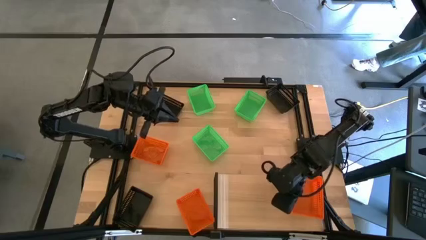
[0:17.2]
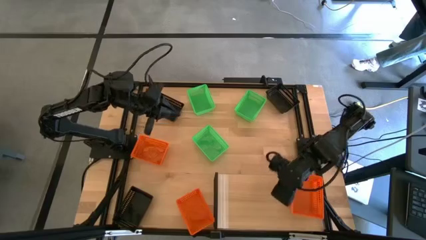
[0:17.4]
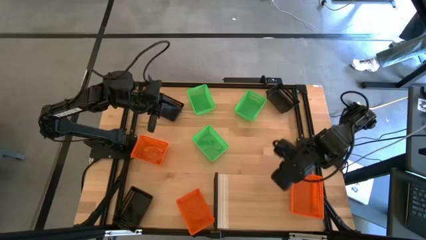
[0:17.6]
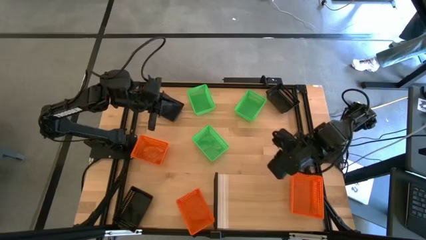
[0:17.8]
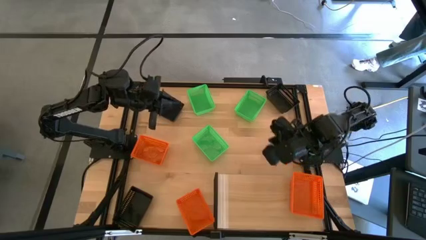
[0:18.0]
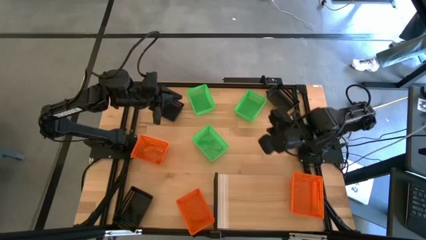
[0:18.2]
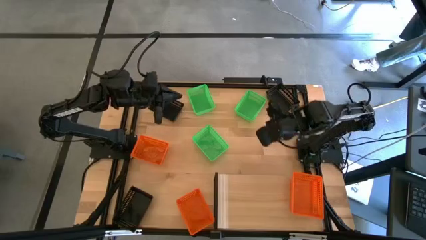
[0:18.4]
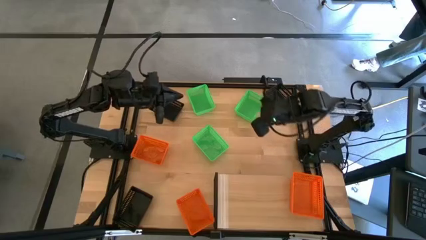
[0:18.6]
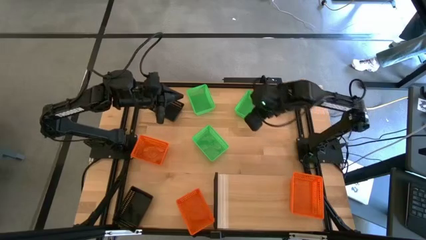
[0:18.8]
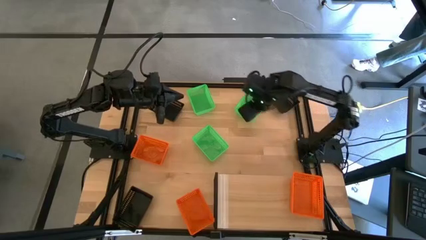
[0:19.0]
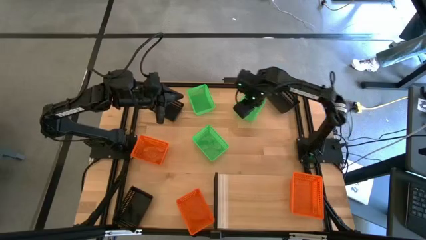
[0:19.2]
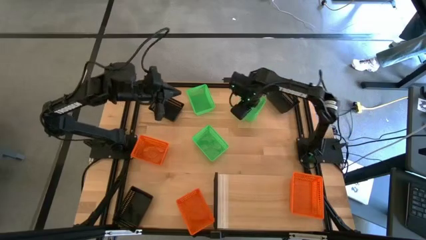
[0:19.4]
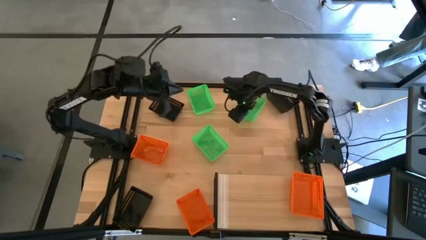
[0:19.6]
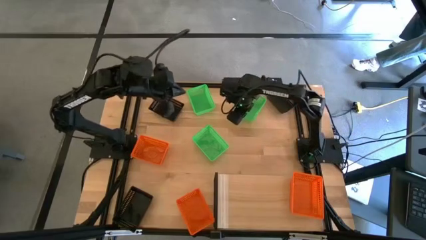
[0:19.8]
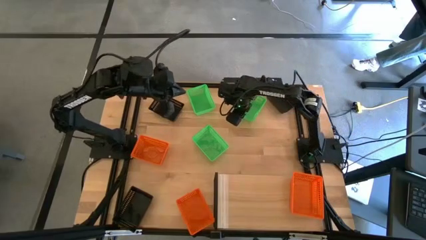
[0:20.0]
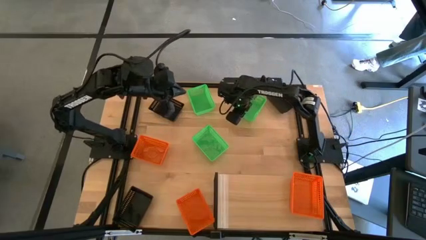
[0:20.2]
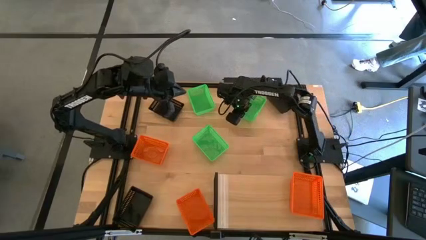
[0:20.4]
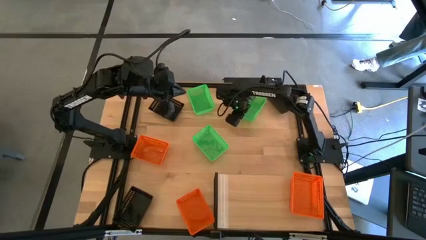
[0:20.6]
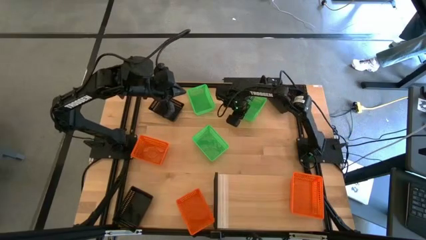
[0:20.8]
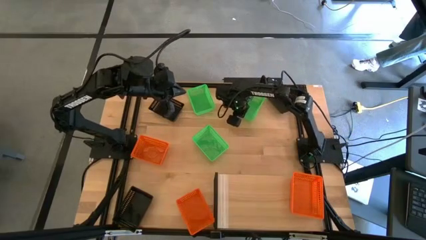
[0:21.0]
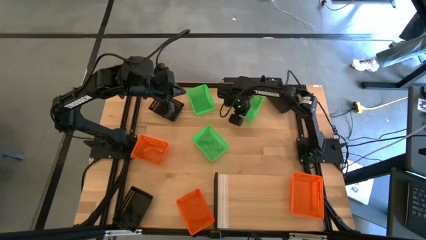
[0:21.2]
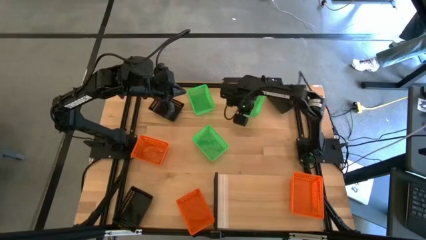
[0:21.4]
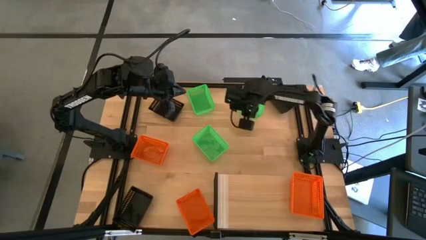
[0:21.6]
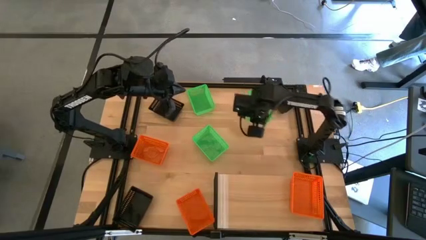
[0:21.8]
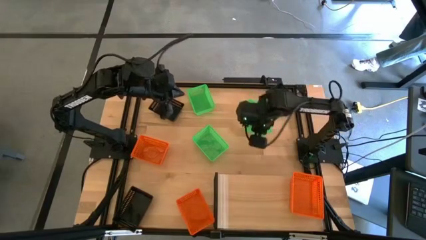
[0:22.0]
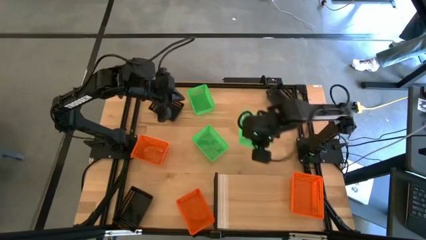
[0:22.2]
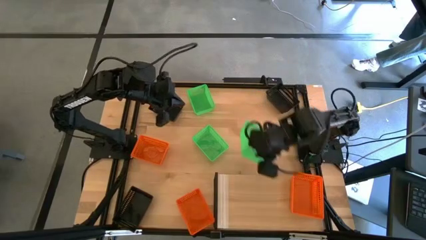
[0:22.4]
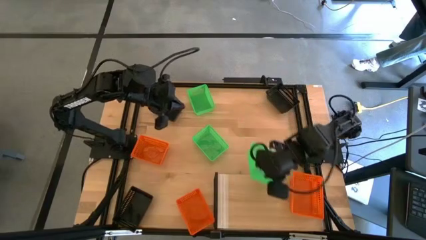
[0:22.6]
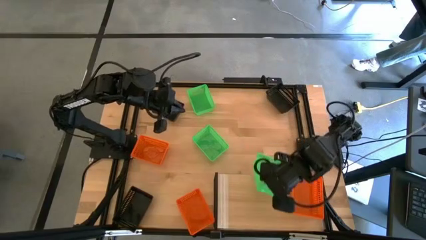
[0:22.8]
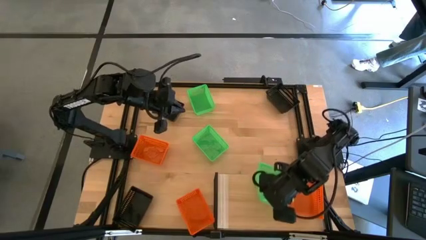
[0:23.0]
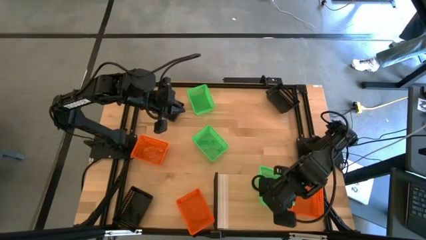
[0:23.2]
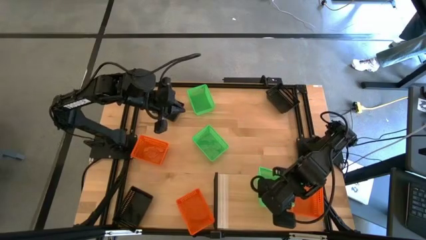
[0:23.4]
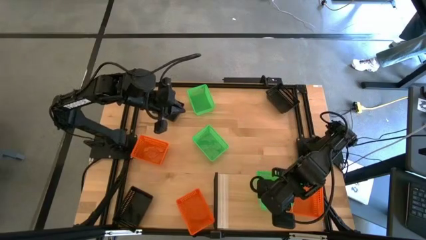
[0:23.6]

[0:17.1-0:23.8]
Task: Stack baskets on shelf by color
Put the top right green bin on the shelf

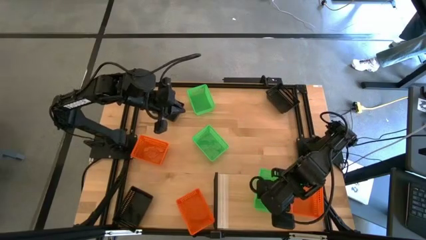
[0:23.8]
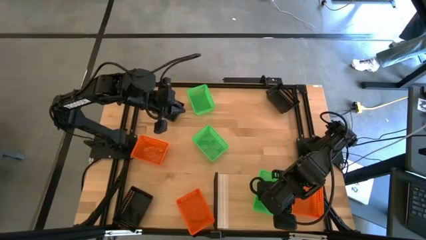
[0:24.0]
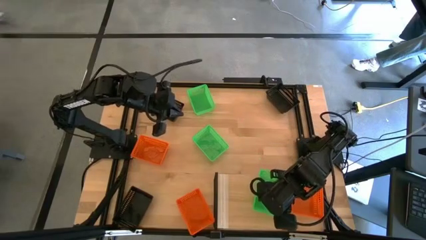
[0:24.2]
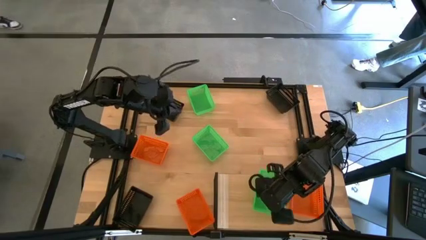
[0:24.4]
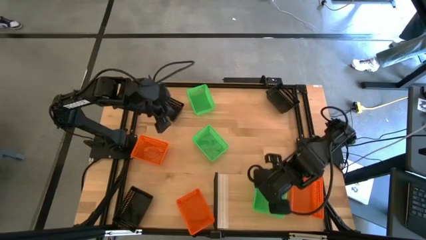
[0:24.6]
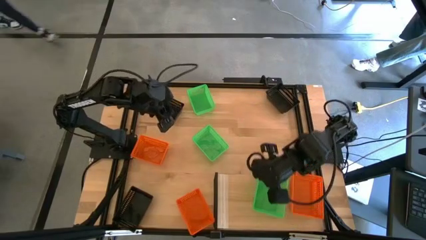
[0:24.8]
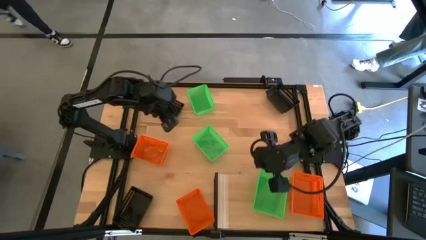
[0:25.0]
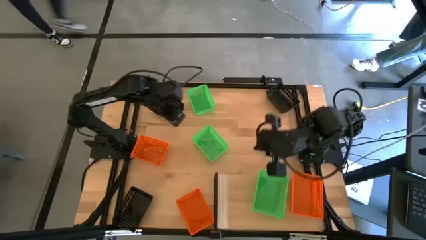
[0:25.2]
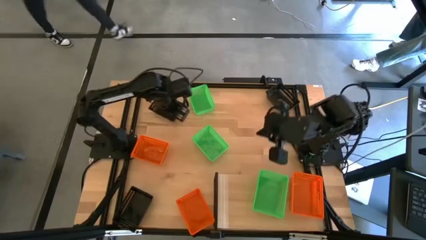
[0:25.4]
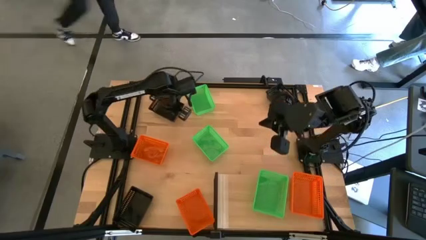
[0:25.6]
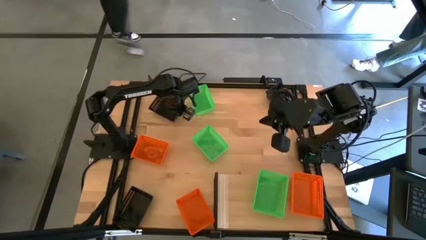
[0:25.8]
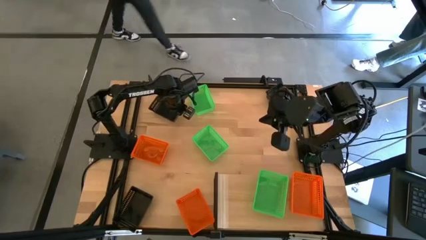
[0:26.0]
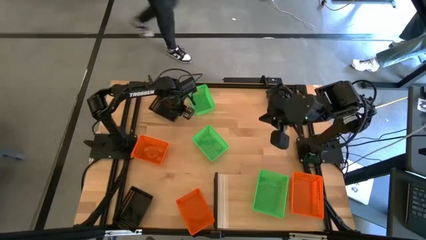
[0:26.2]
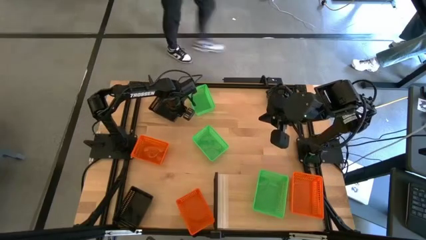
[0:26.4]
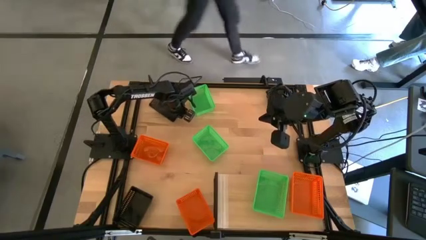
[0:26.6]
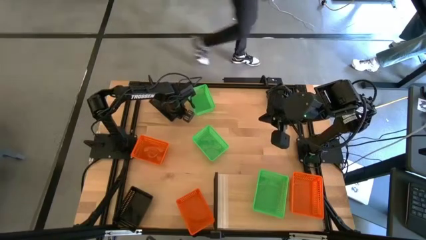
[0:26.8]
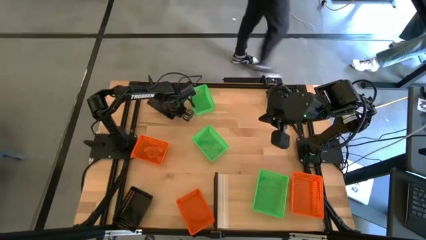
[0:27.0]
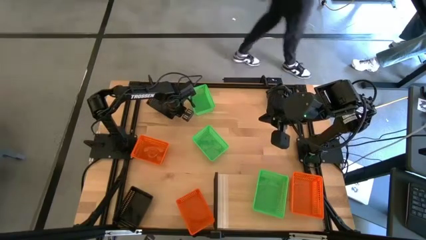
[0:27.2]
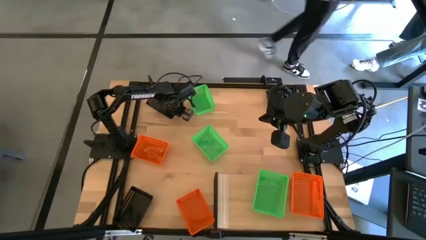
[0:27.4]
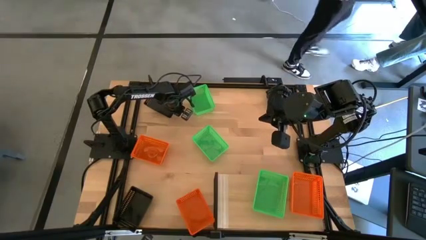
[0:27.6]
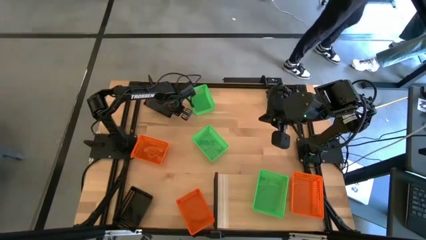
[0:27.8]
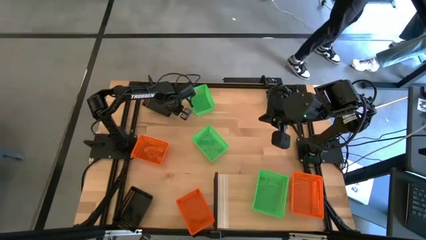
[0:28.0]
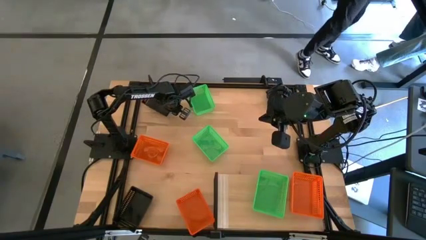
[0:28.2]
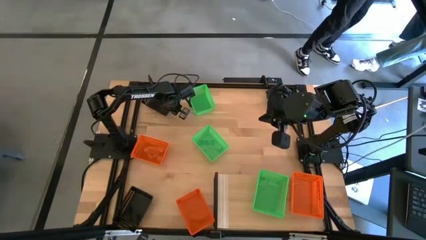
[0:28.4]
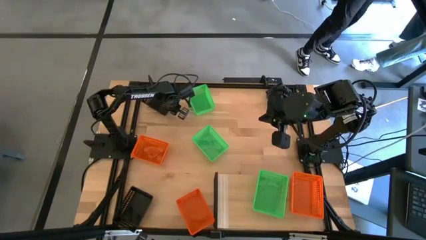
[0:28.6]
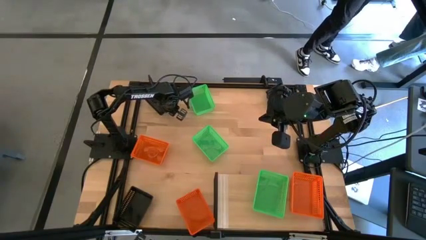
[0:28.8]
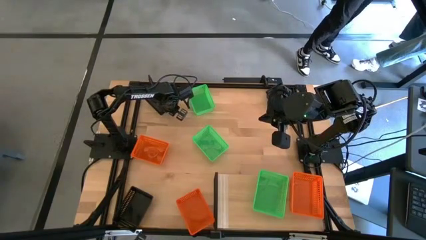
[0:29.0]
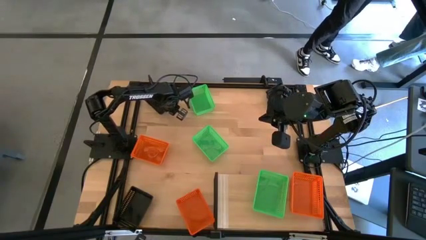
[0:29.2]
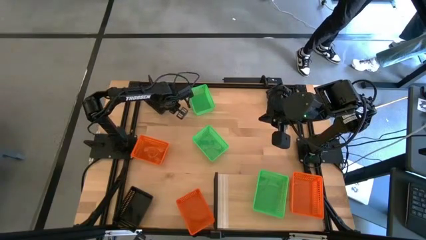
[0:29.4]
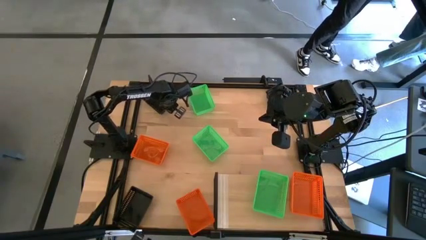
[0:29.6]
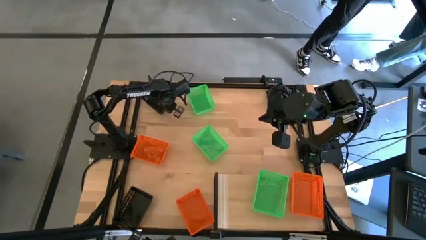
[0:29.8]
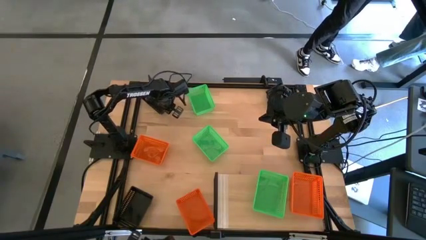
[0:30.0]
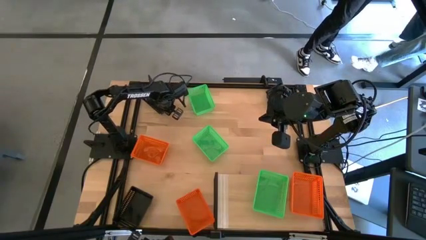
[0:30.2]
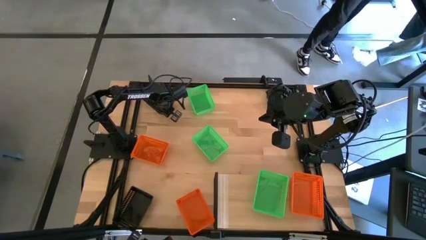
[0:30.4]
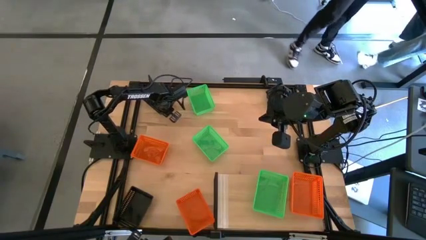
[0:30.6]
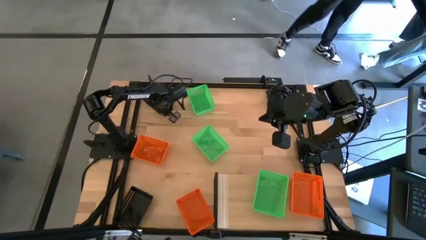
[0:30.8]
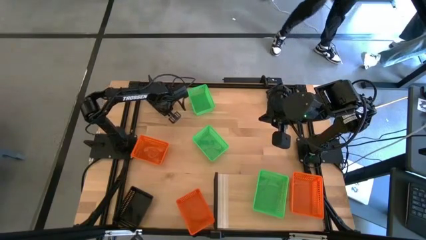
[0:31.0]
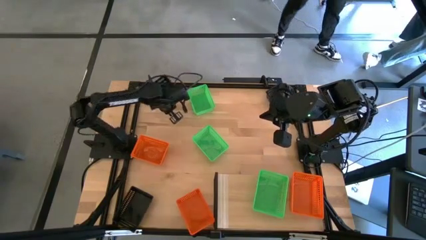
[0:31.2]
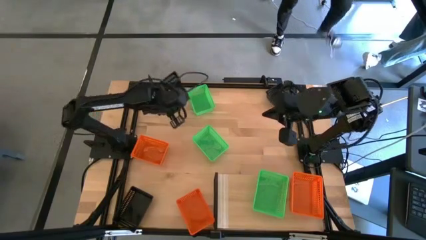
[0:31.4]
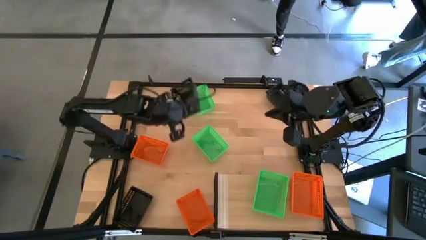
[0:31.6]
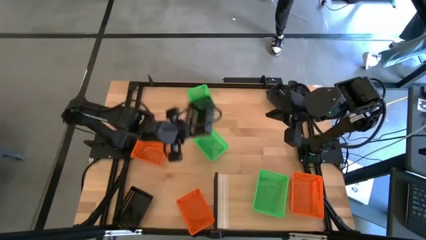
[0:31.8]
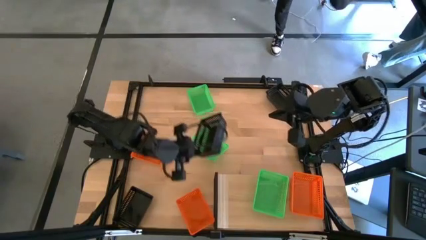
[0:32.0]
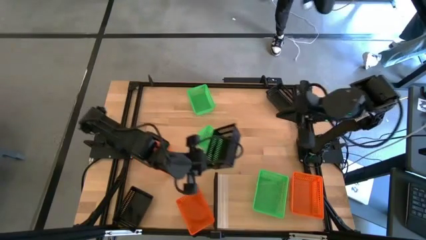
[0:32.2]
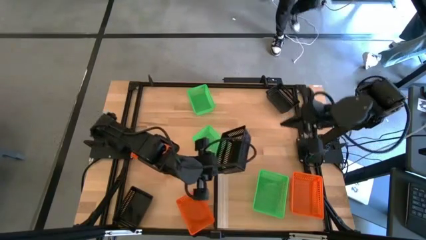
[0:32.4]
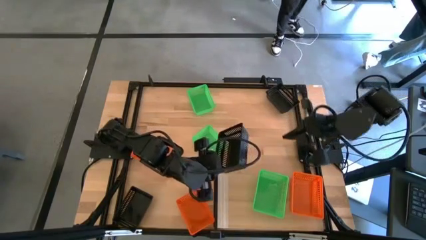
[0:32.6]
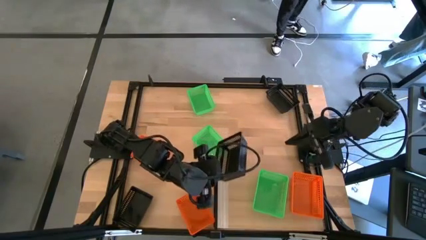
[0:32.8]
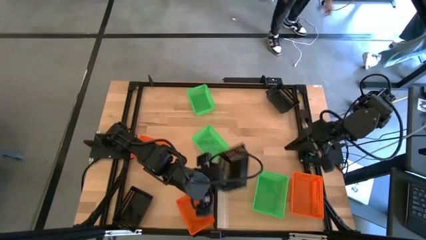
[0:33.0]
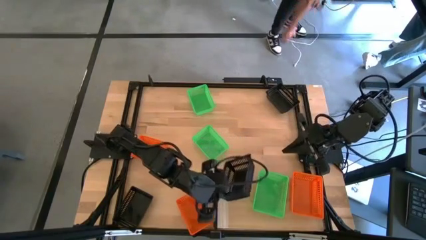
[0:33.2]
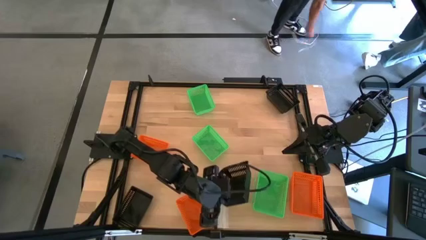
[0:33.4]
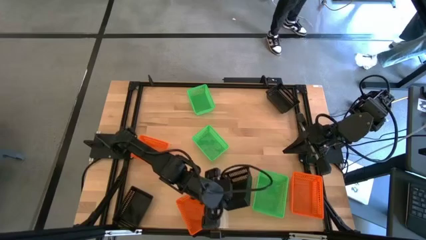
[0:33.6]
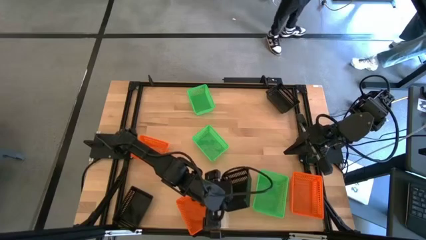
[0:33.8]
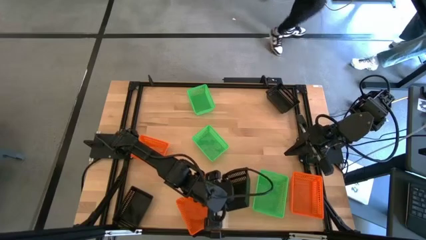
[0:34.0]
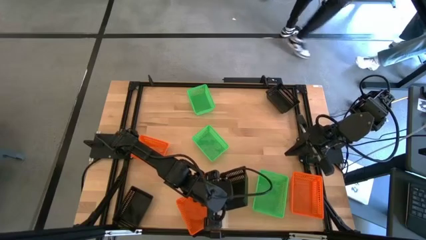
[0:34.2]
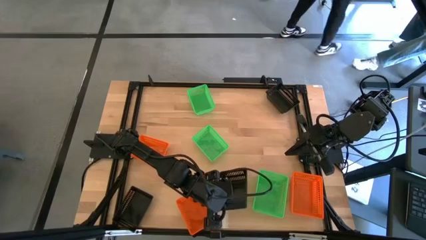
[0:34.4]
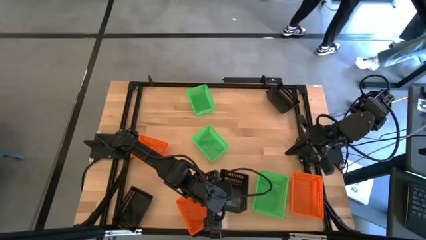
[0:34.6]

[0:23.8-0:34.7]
Put the top left black bin on the shelf
